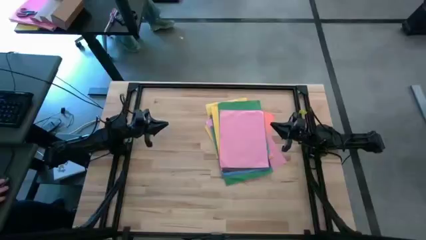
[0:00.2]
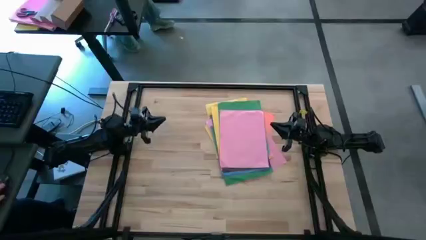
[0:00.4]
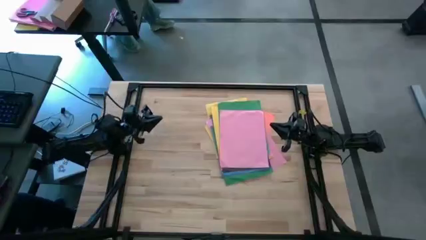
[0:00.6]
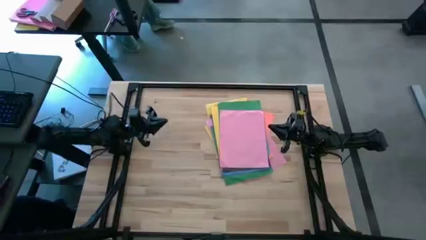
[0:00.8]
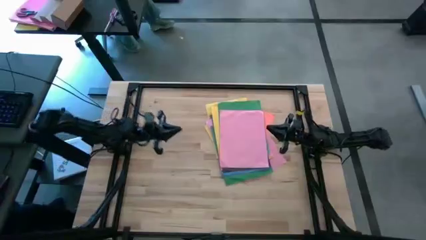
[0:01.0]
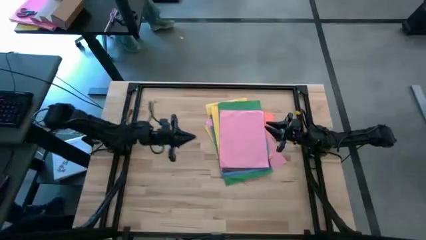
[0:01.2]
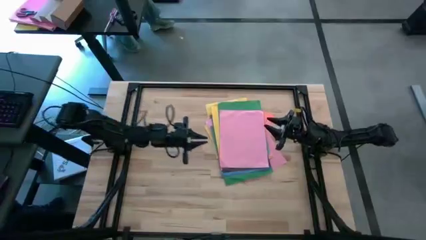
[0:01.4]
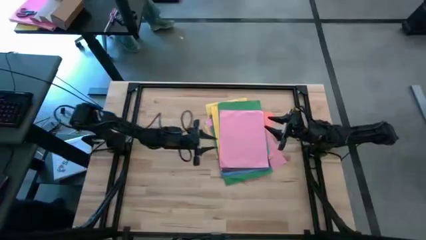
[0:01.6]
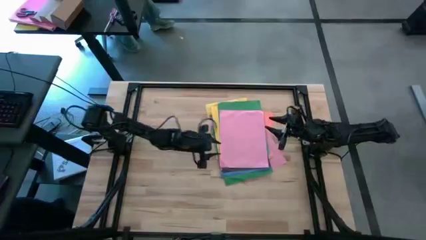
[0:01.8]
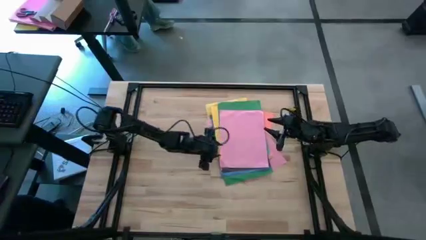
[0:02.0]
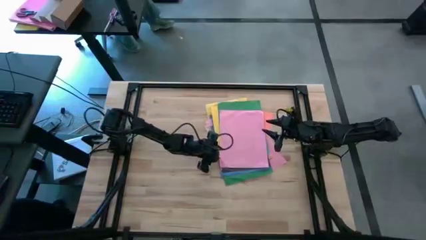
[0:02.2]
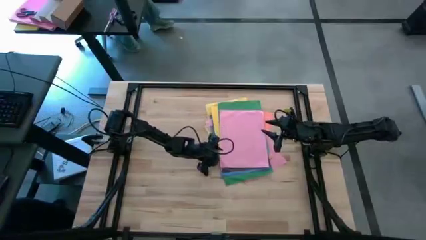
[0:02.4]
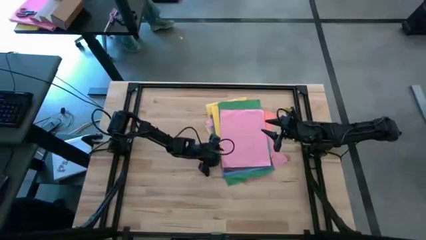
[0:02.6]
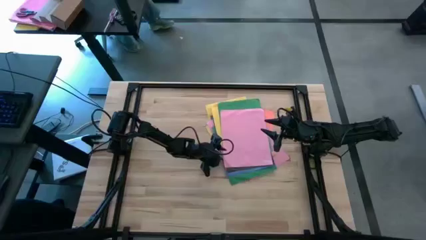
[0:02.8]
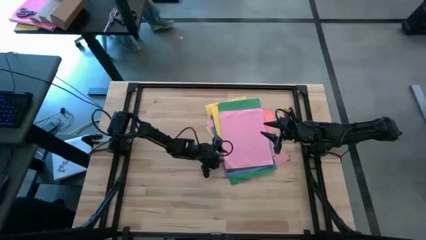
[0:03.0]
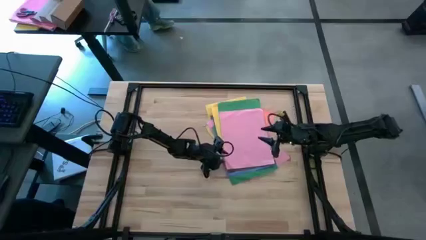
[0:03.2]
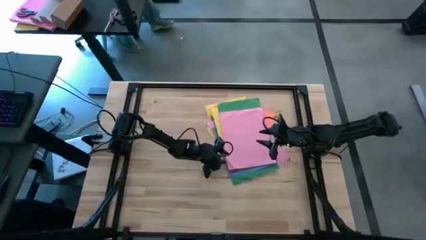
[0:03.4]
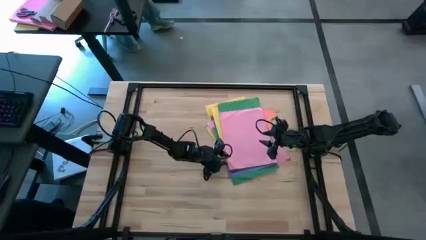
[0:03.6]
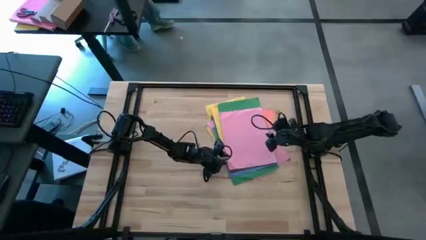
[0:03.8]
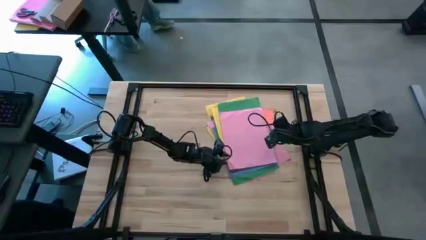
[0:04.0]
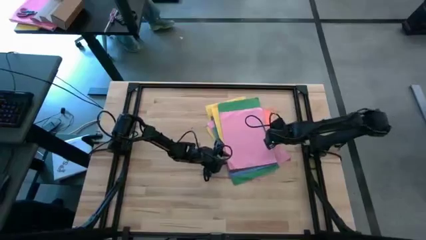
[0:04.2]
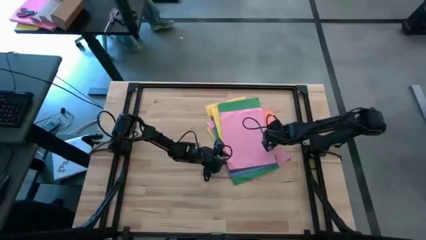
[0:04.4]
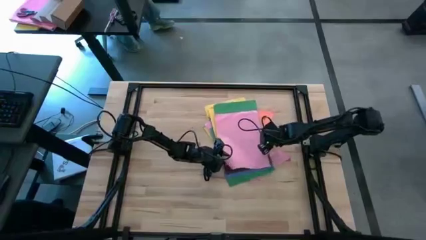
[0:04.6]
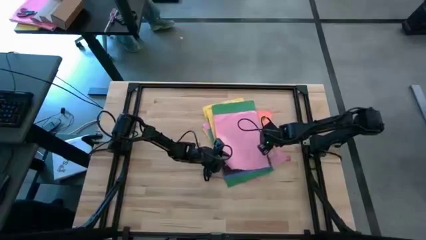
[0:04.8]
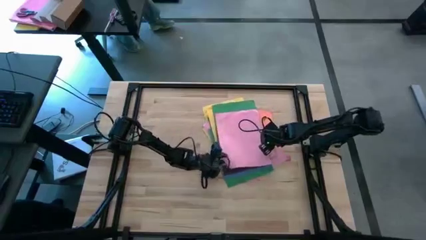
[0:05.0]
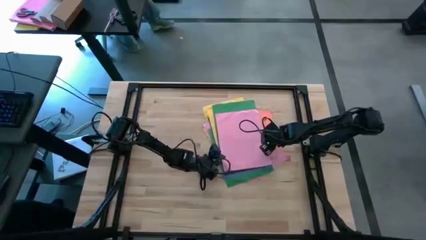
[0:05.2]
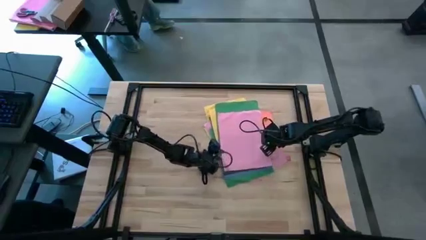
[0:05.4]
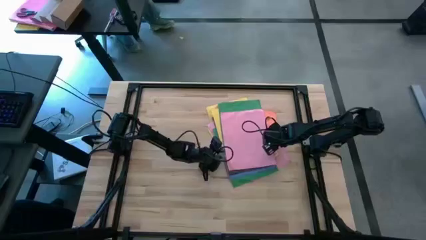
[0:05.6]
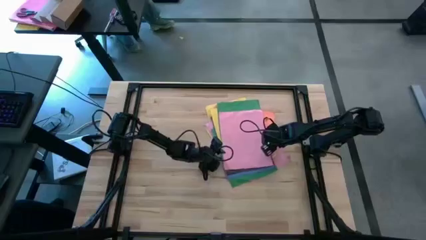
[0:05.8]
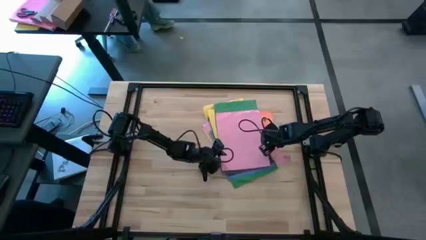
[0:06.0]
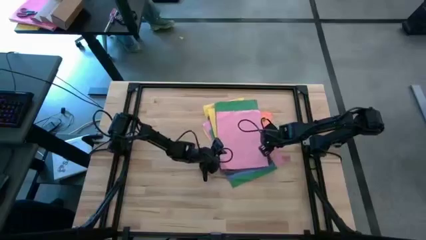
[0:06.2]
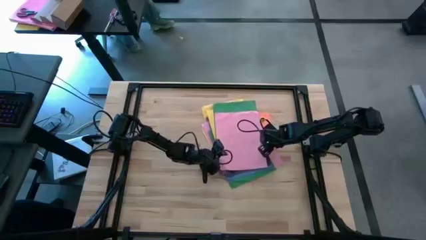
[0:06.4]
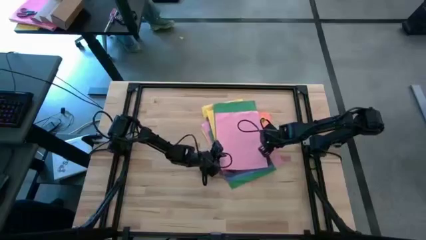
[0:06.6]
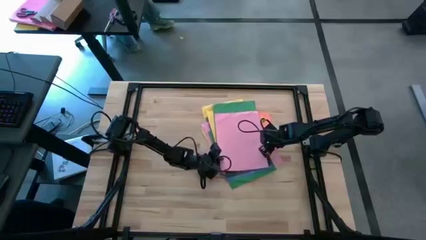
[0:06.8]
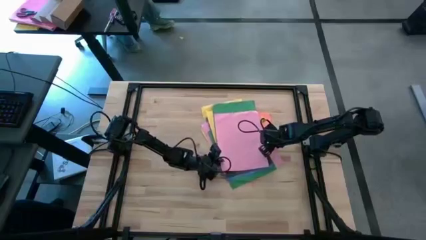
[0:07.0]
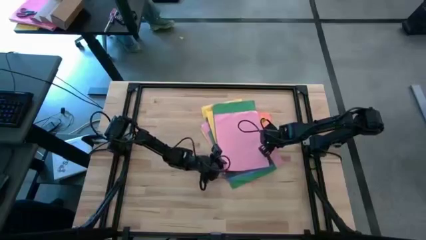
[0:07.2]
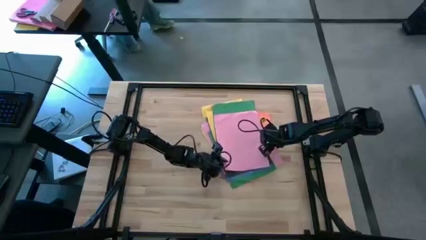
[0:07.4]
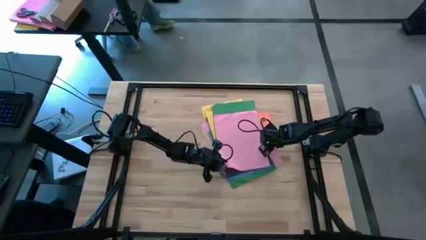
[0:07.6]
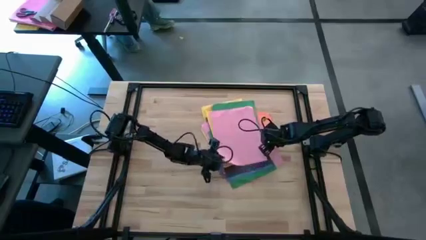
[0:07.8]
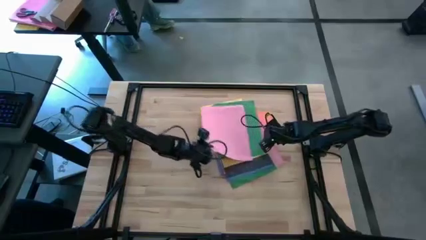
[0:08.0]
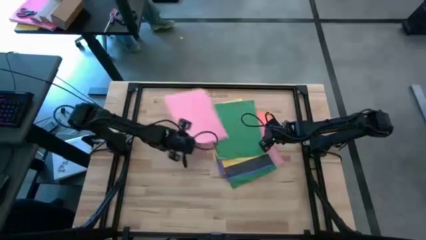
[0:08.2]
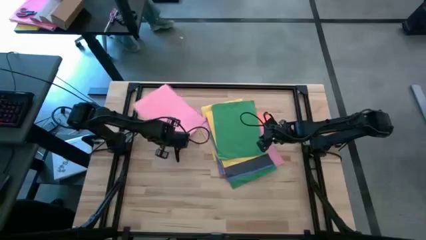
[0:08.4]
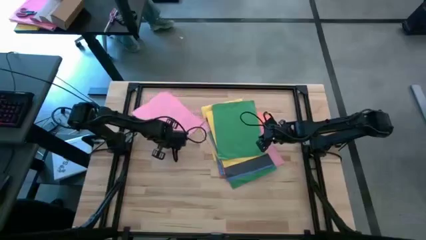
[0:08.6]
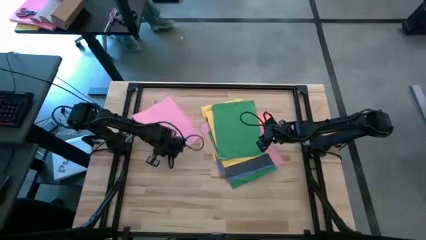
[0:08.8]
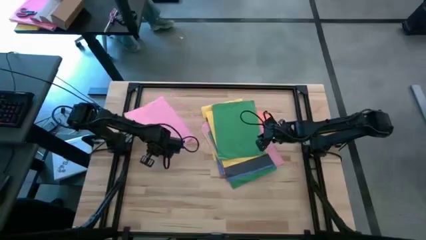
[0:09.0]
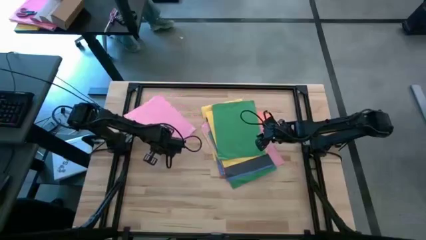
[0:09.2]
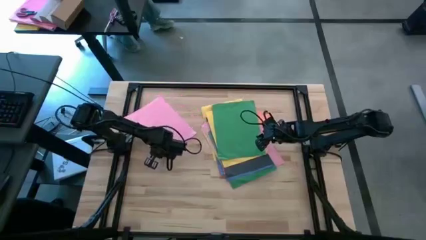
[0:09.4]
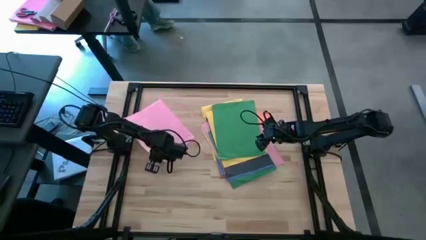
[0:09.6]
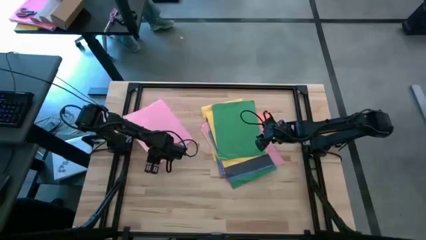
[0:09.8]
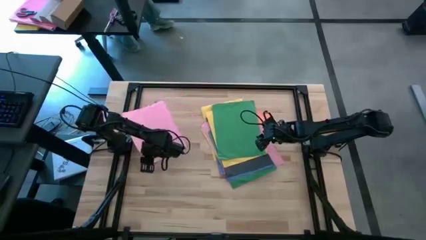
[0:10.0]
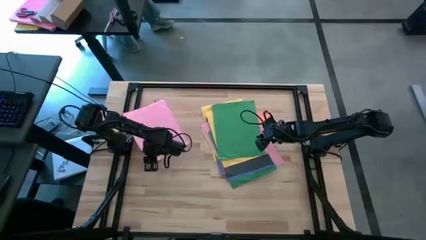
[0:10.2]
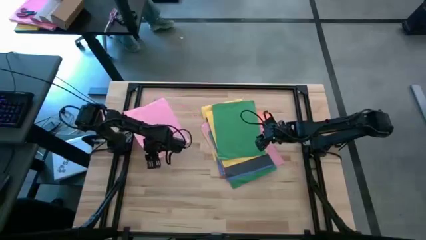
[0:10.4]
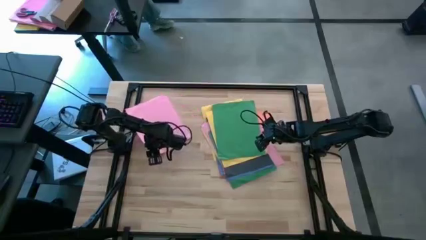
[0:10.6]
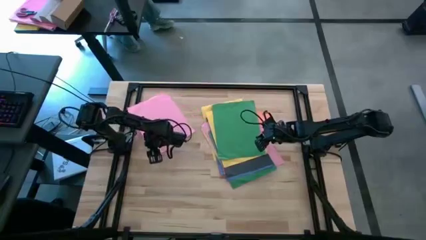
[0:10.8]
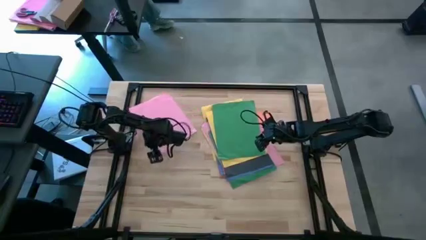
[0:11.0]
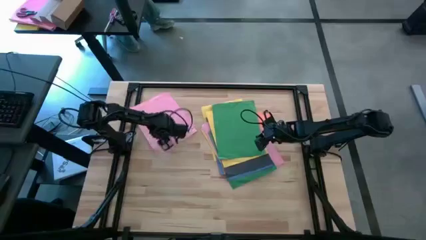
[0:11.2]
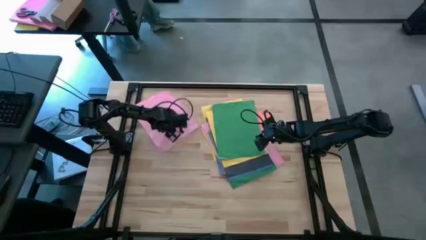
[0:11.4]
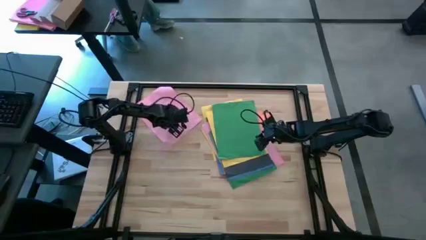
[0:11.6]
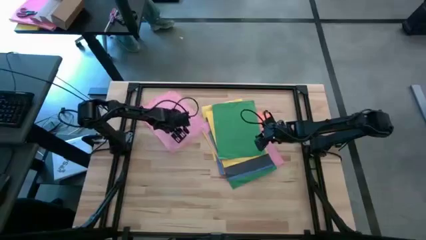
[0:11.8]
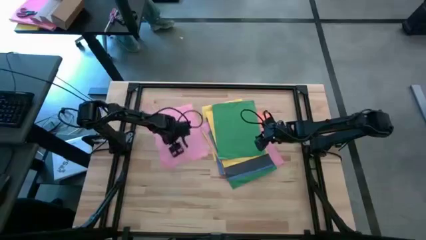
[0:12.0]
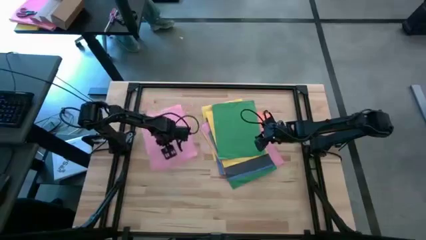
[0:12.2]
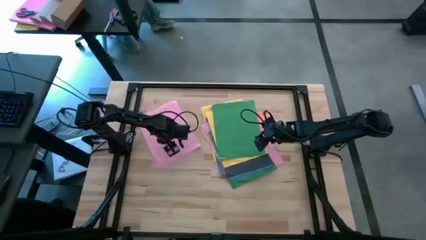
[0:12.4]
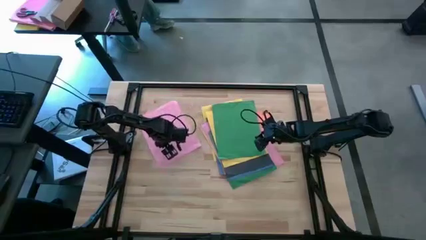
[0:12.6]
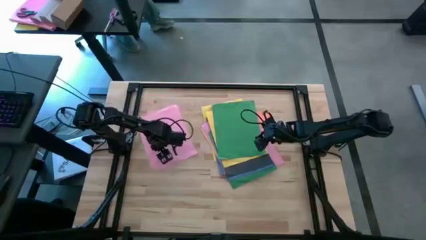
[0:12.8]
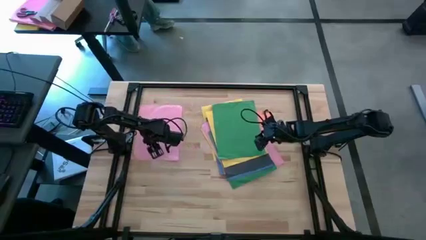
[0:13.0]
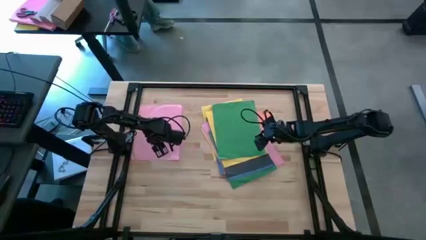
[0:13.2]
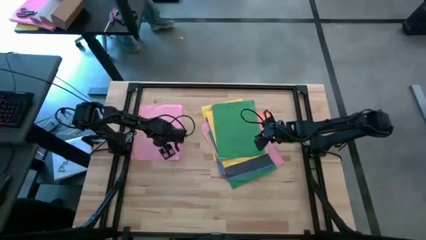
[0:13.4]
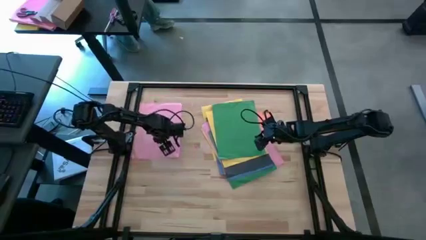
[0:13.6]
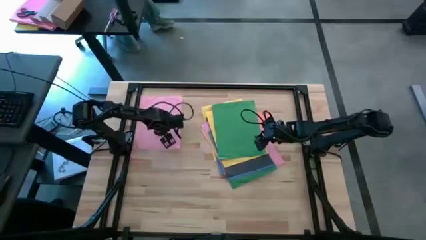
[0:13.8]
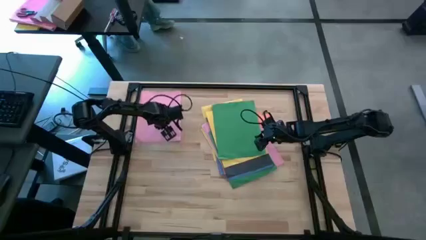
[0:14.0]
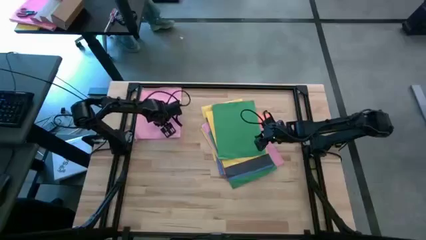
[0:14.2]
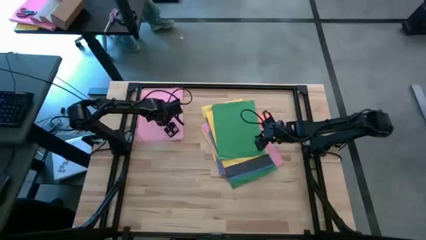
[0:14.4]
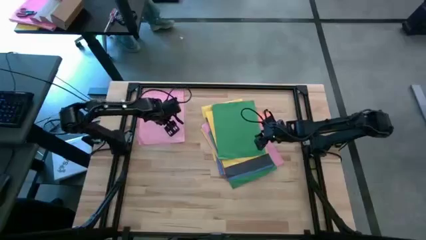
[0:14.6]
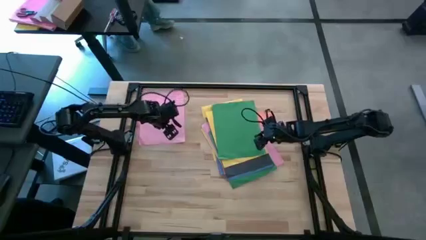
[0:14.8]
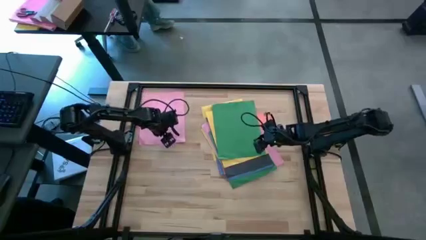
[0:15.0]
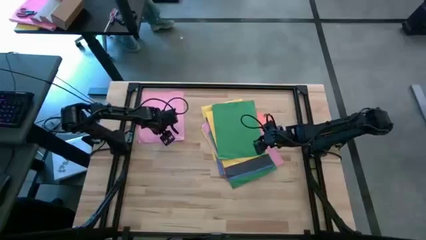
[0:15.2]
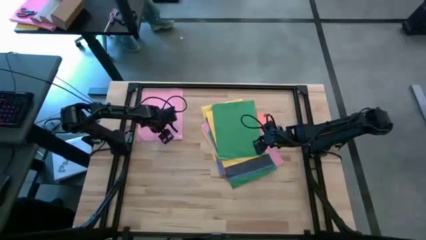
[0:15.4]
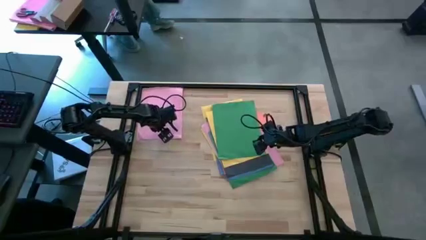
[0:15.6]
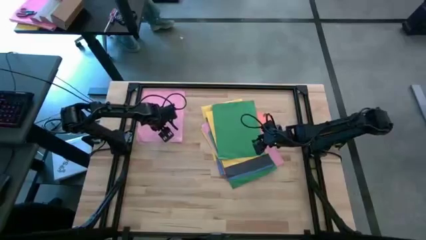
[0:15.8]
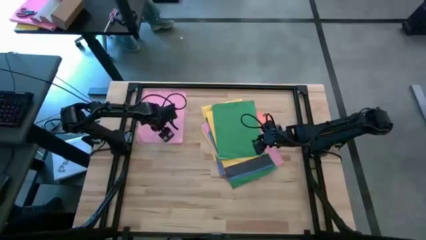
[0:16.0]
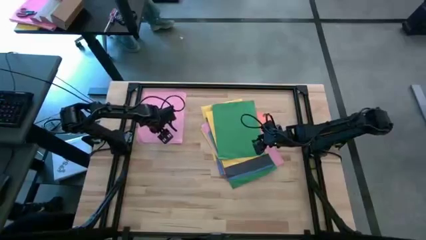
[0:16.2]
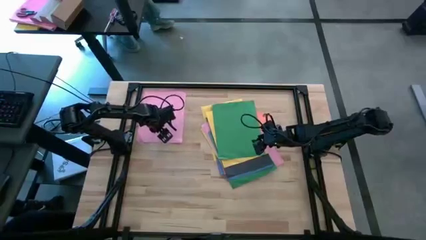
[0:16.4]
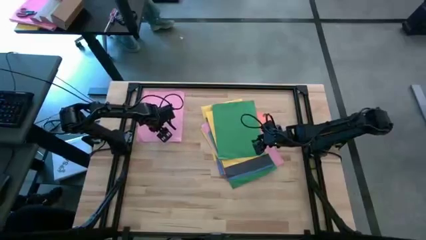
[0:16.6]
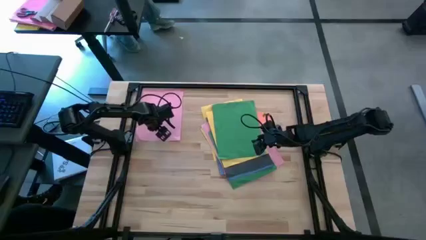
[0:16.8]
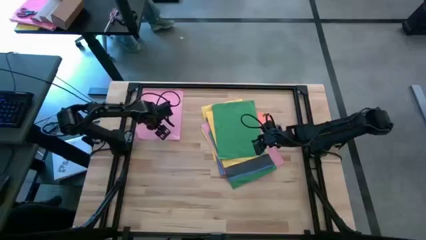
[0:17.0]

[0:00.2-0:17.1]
Task: Organize paper
Move the pink color paper to the top left of the table
